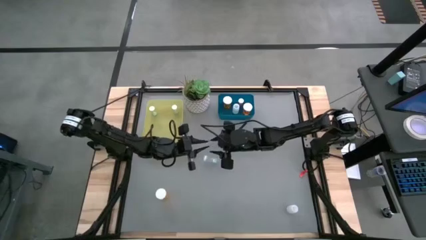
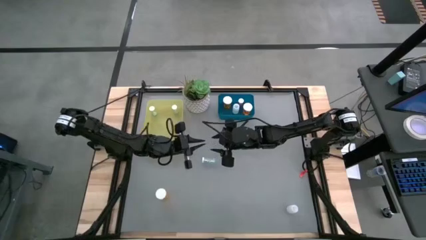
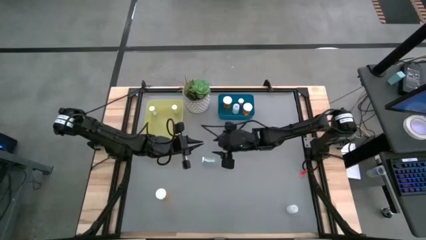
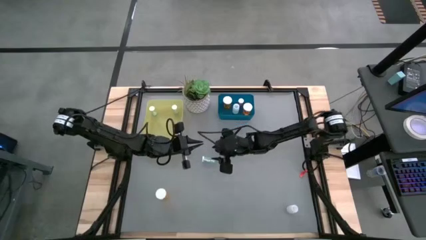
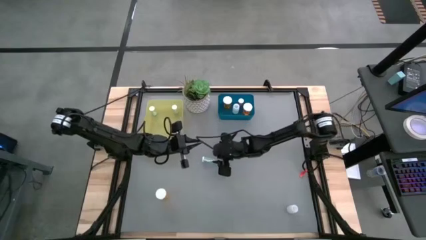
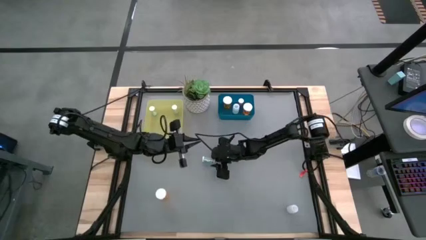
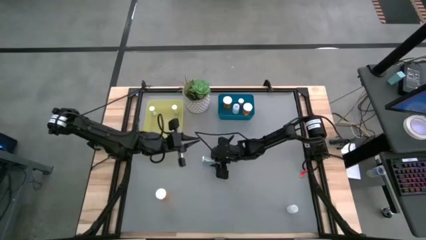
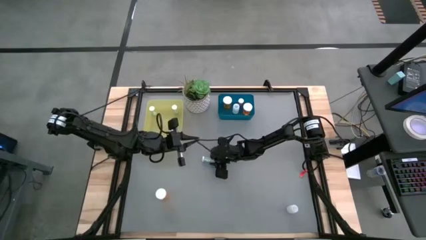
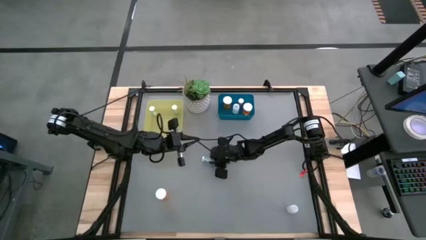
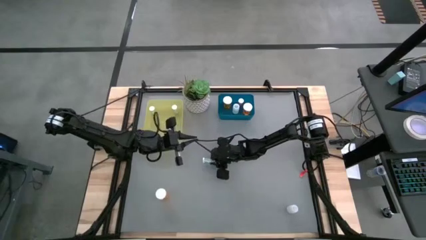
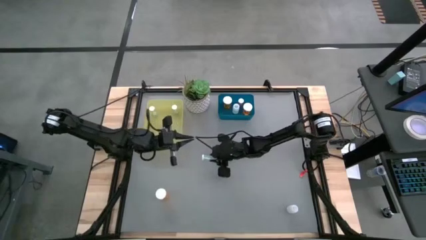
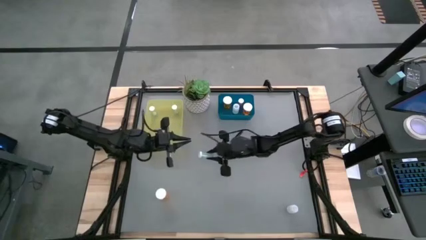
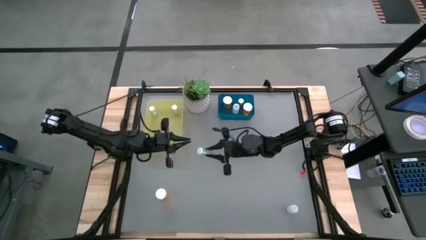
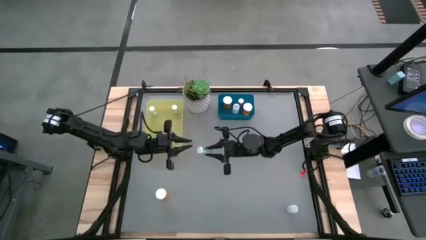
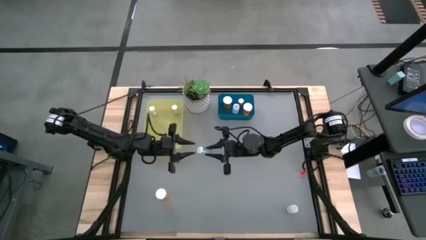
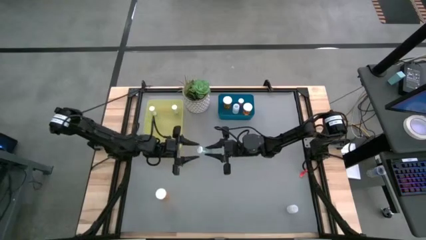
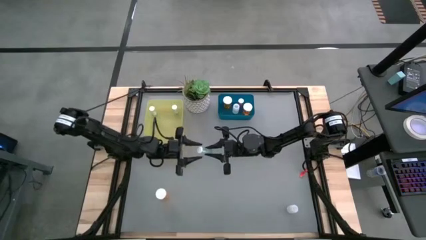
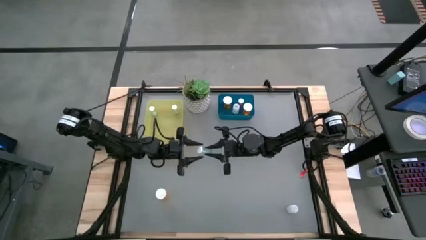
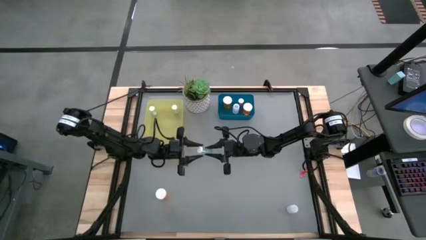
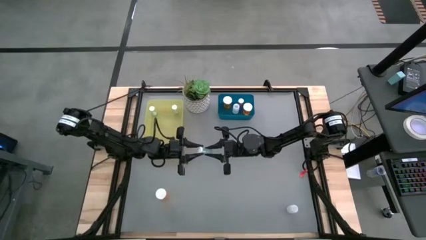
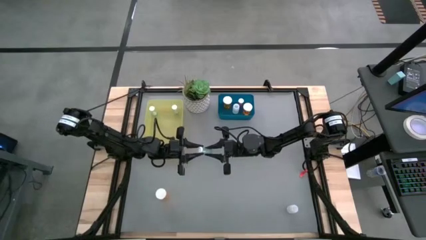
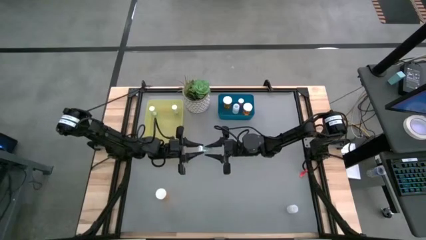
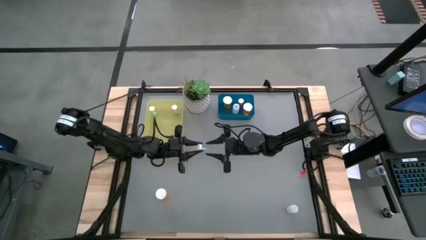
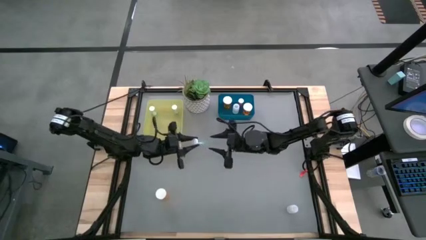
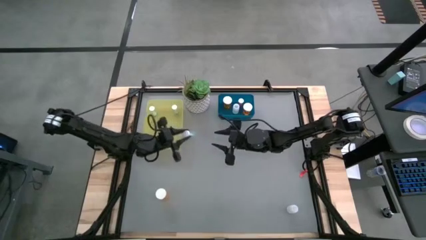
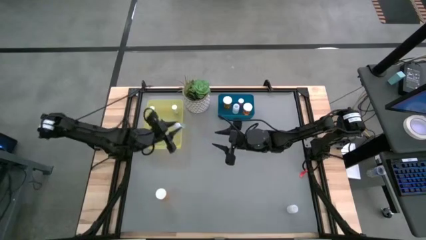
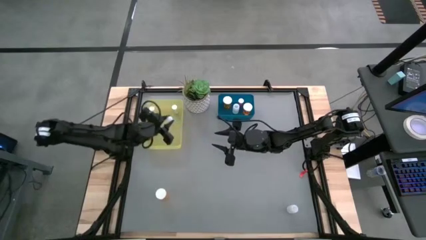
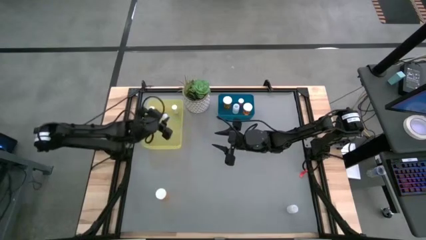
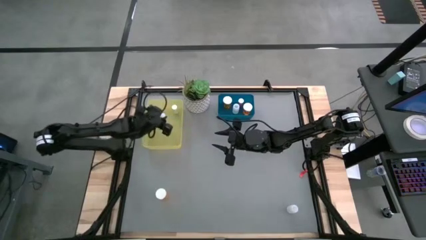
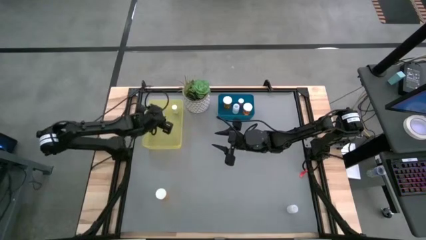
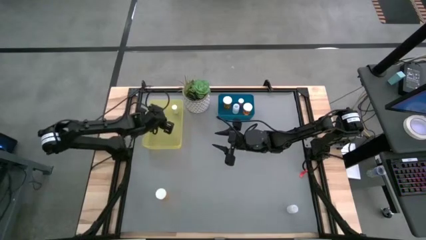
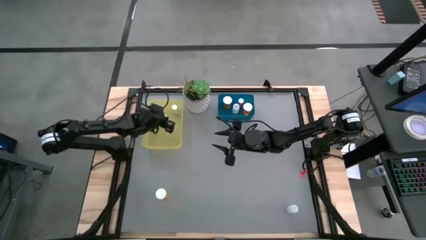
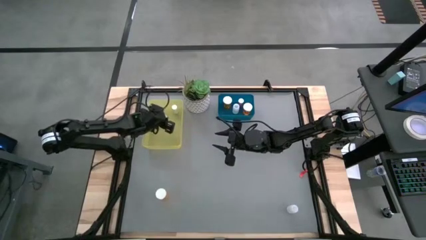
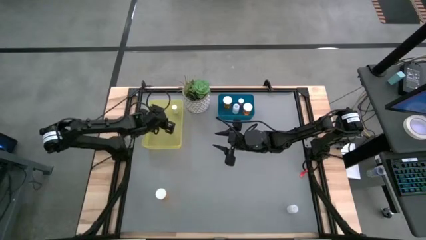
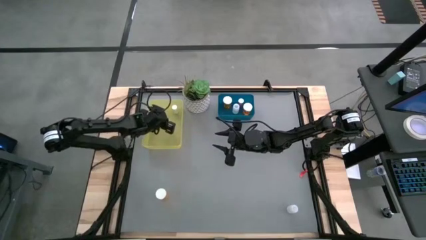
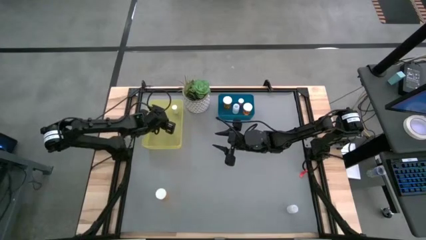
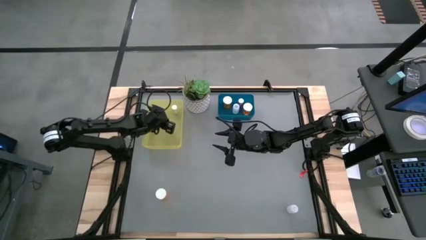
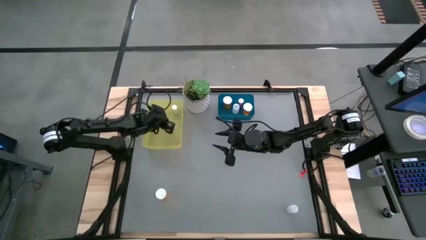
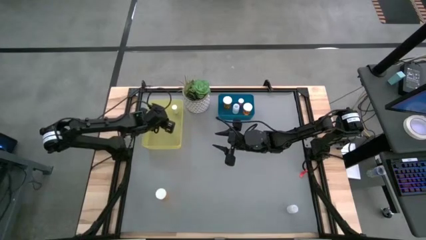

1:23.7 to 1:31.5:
Task: Pick and place medicine bottles into bin by pill shape (circle, oval)
Put the blue tablet bottle into the yellow bin

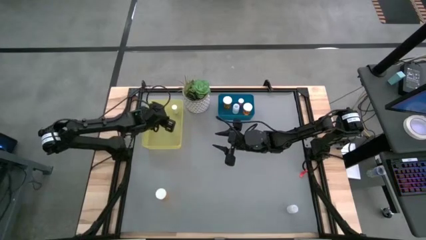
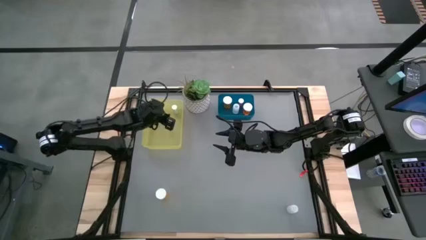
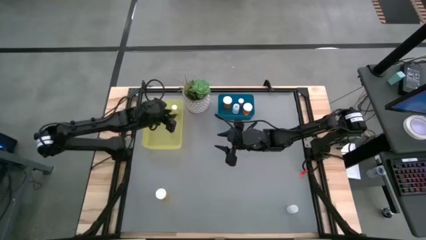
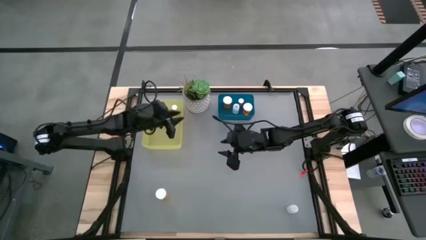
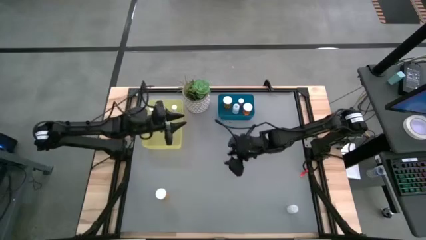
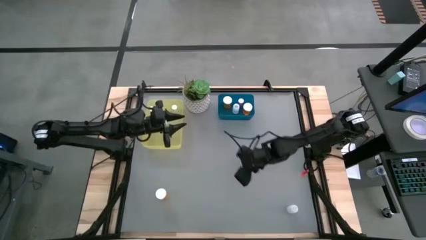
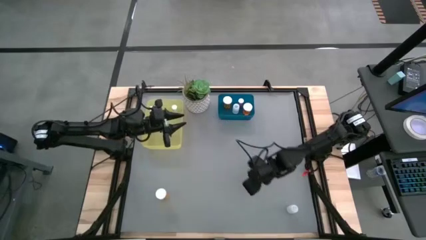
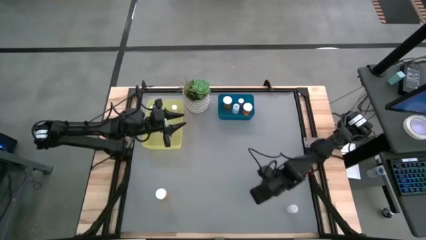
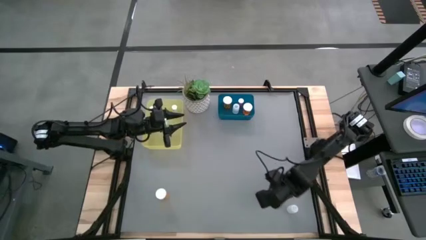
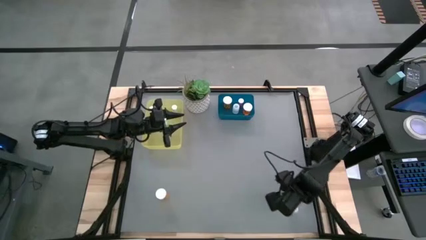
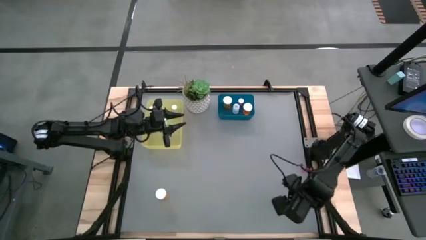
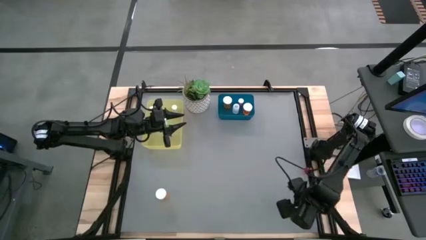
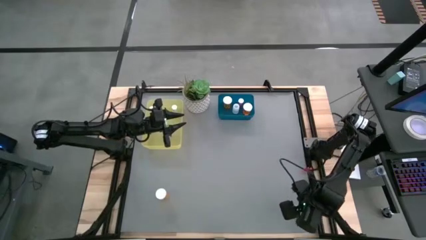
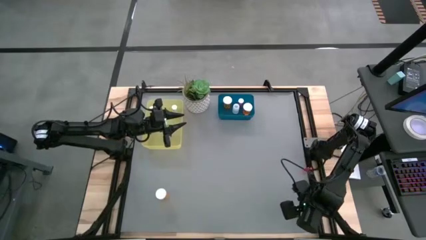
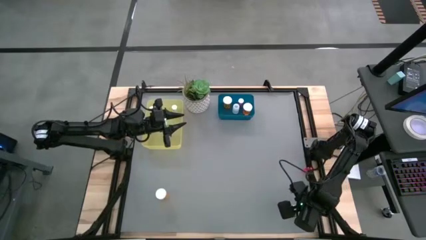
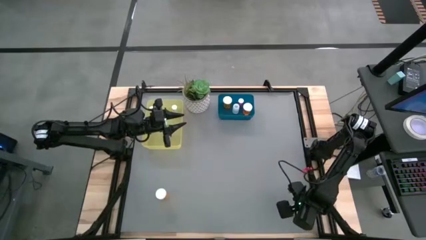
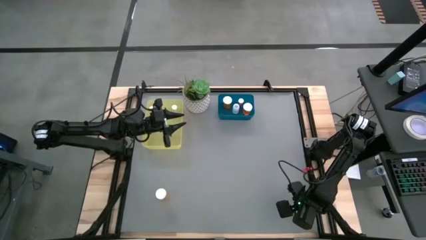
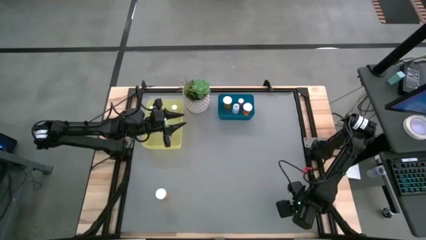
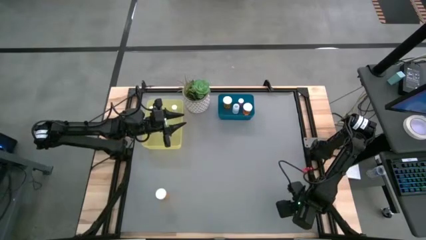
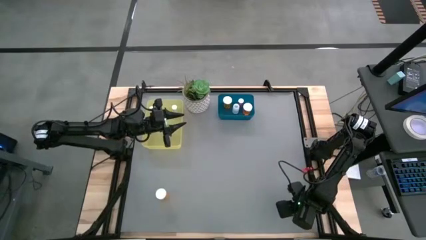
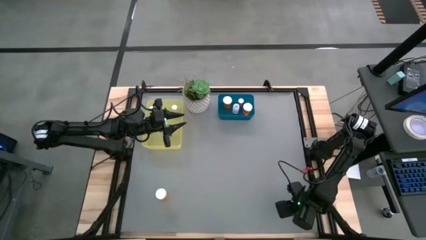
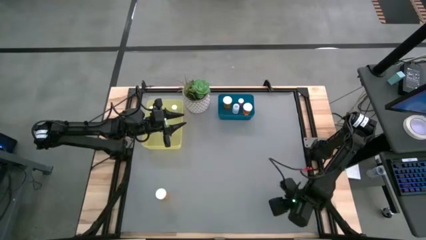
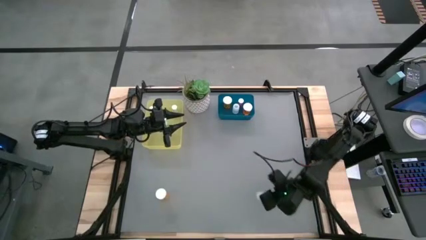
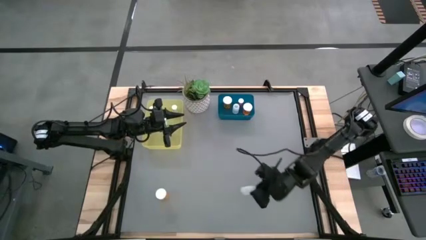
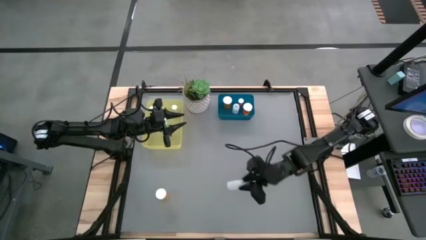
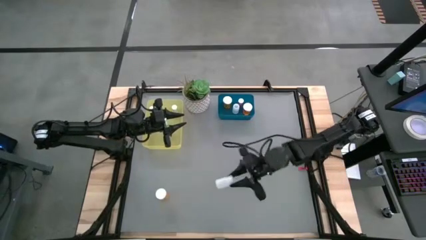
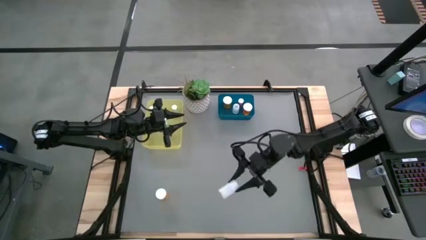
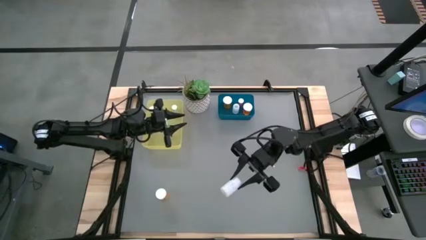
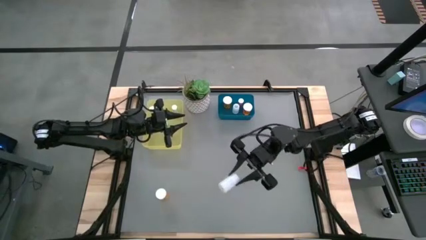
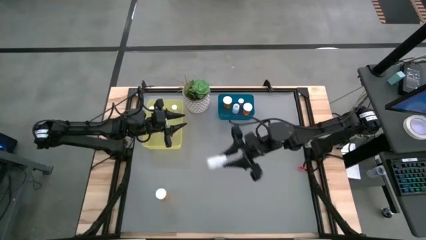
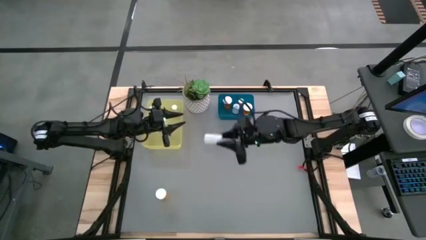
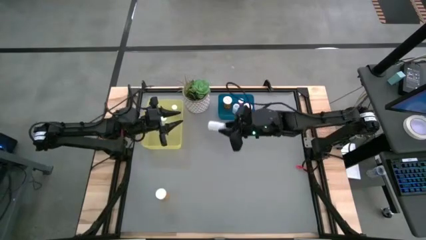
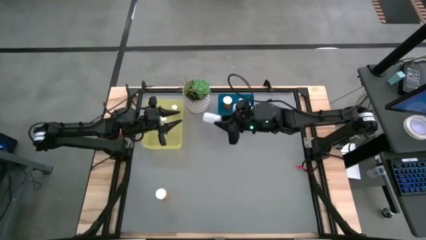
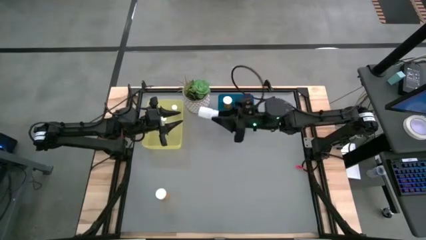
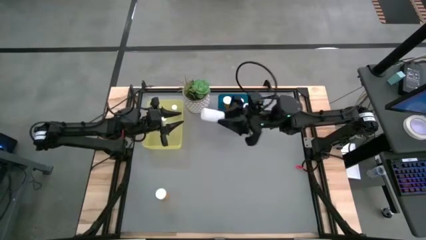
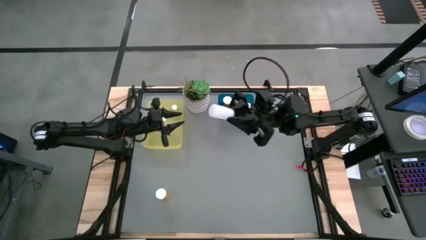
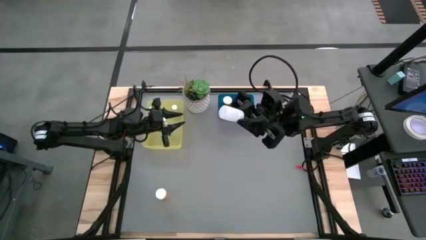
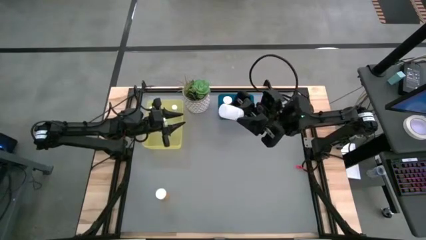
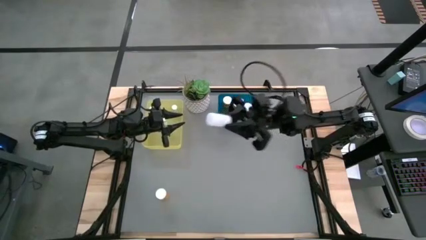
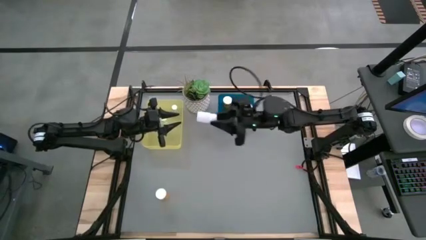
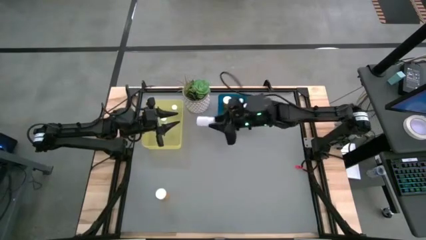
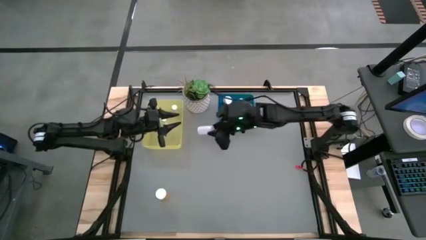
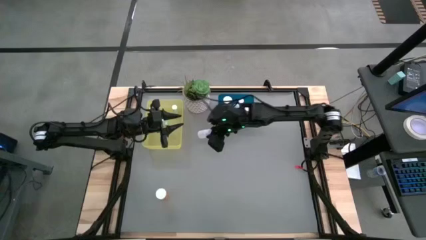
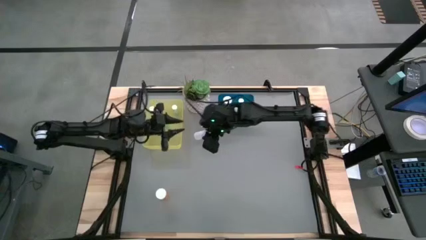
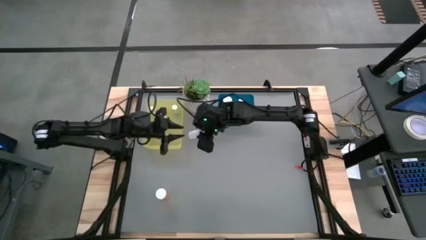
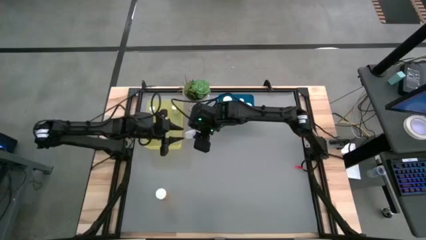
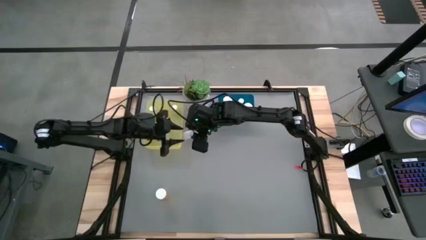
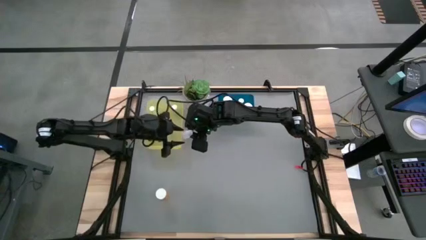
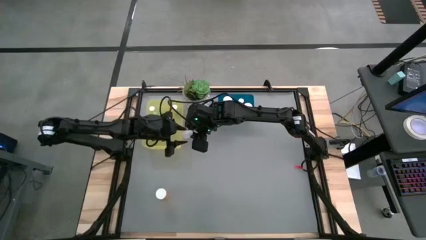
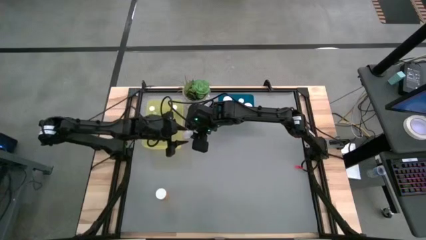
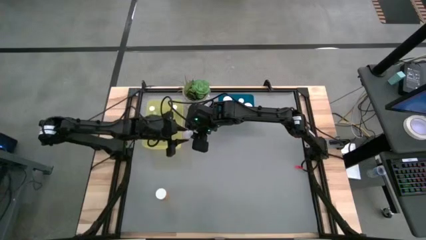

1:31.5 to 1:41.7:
Put the white tablet bottle into the yellow bin
